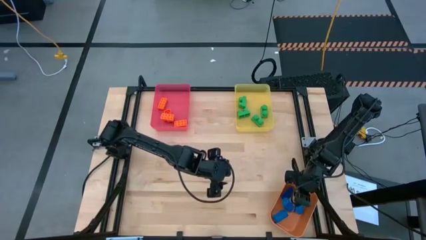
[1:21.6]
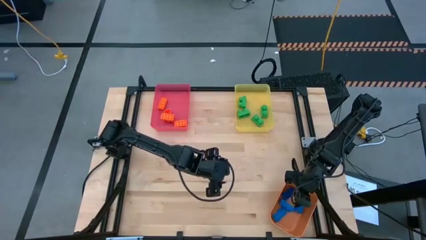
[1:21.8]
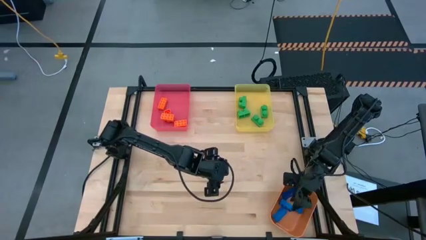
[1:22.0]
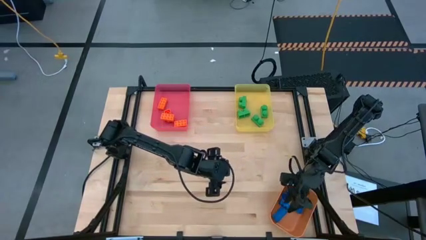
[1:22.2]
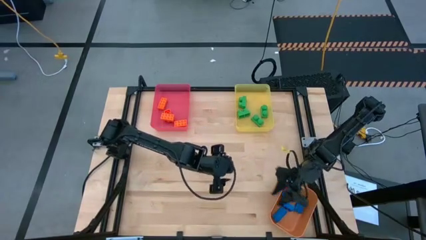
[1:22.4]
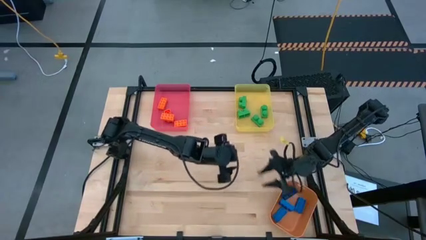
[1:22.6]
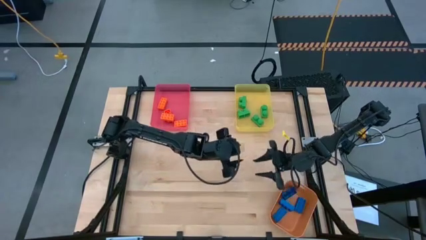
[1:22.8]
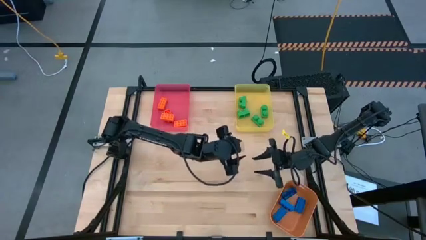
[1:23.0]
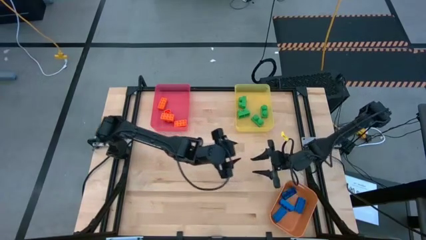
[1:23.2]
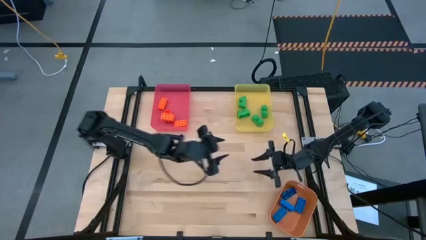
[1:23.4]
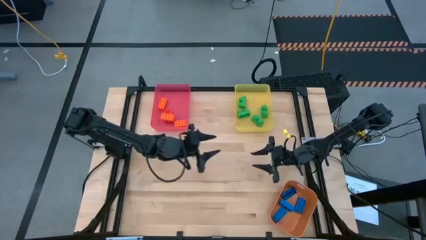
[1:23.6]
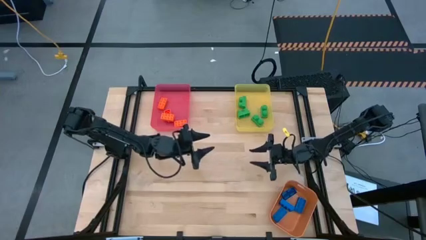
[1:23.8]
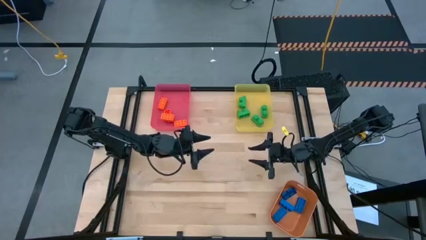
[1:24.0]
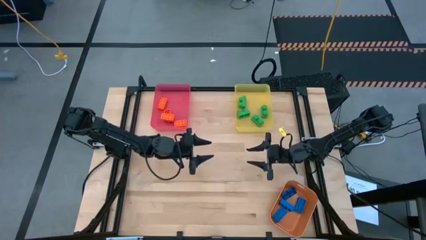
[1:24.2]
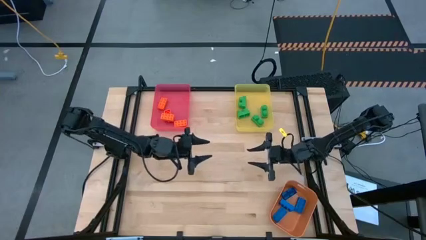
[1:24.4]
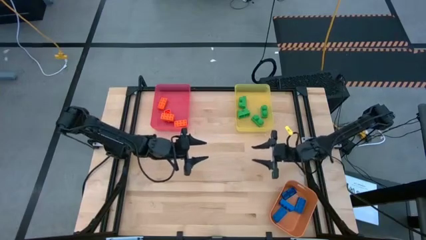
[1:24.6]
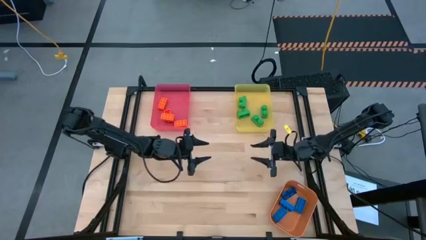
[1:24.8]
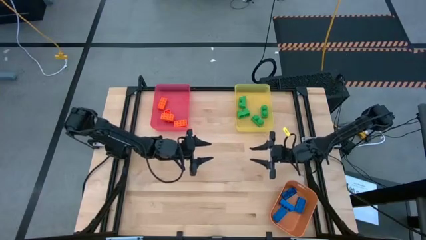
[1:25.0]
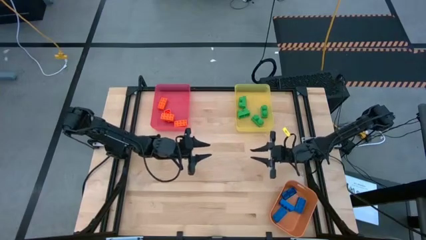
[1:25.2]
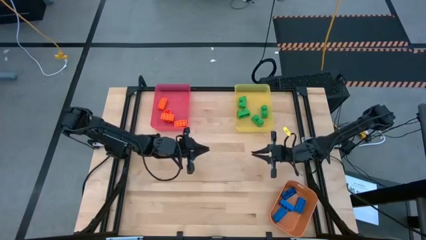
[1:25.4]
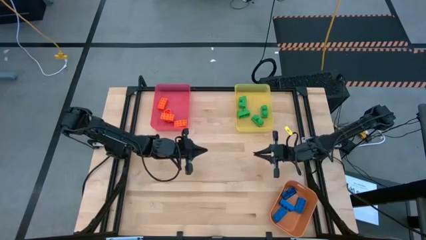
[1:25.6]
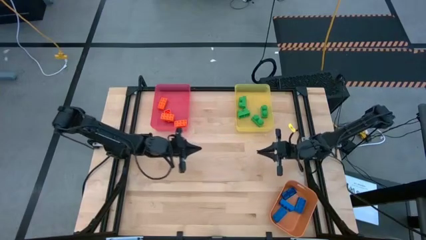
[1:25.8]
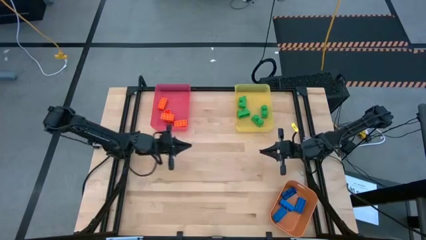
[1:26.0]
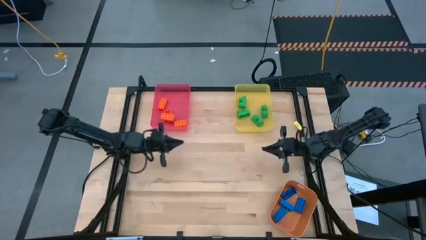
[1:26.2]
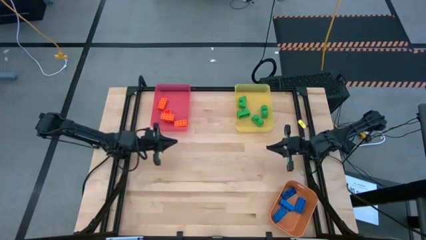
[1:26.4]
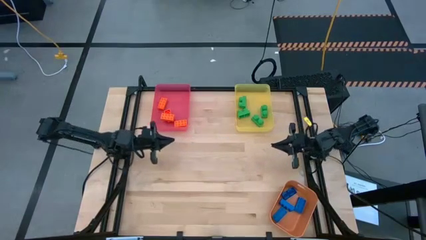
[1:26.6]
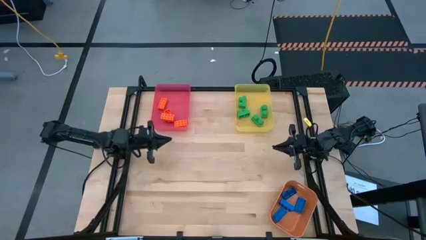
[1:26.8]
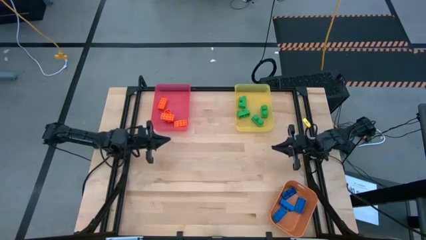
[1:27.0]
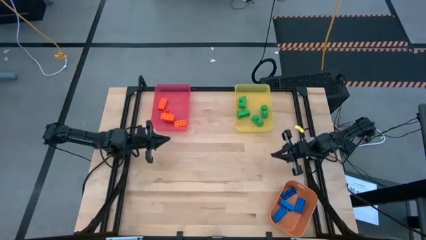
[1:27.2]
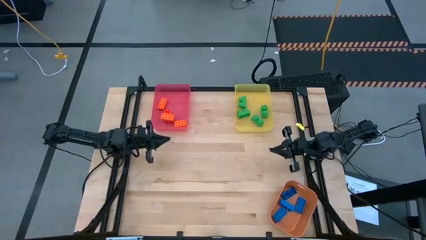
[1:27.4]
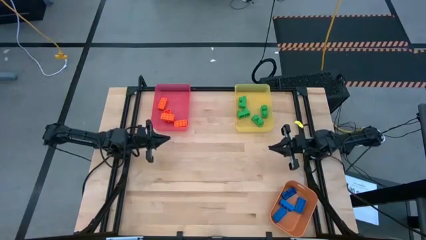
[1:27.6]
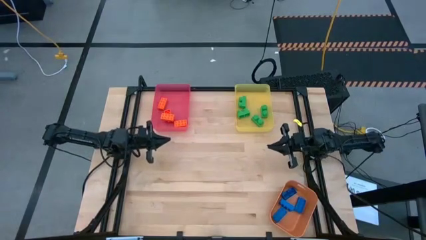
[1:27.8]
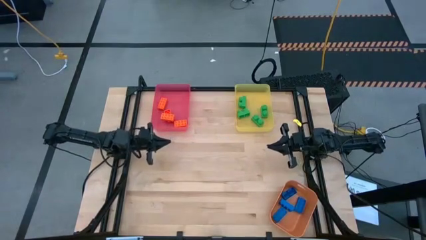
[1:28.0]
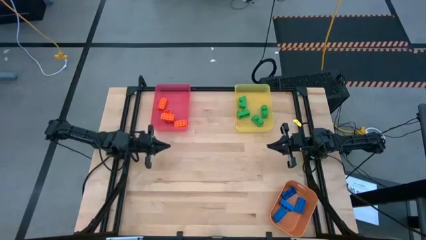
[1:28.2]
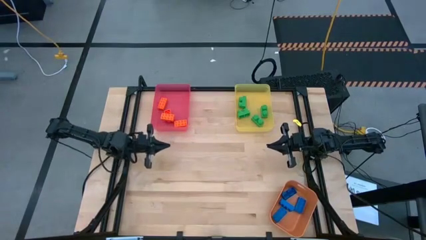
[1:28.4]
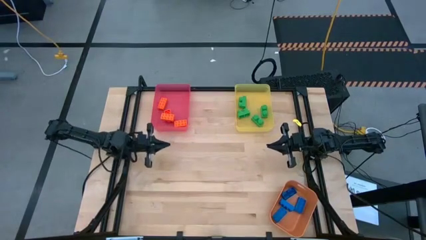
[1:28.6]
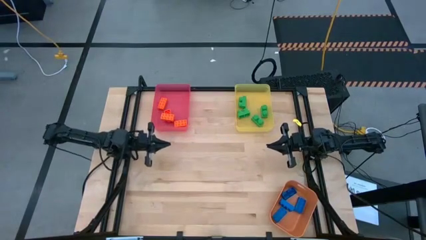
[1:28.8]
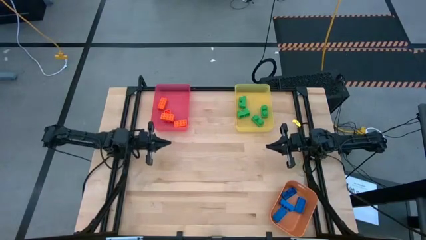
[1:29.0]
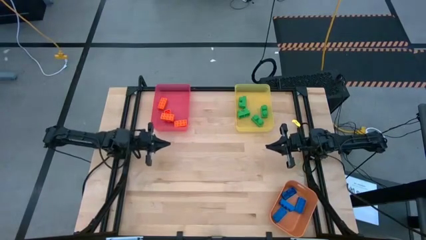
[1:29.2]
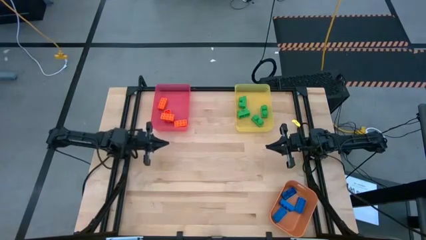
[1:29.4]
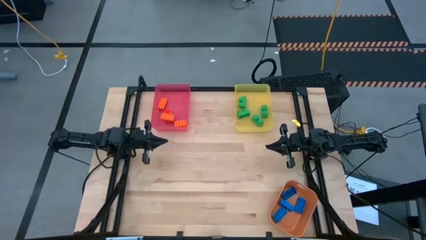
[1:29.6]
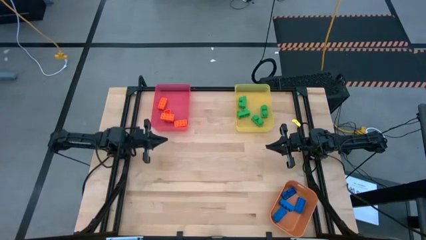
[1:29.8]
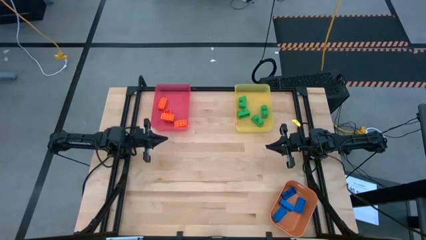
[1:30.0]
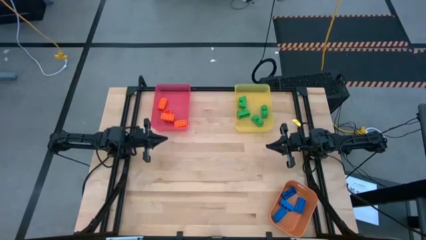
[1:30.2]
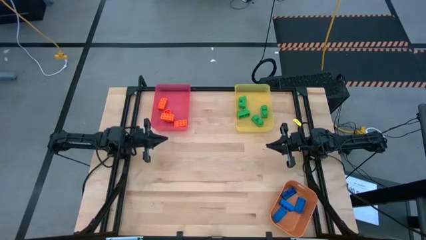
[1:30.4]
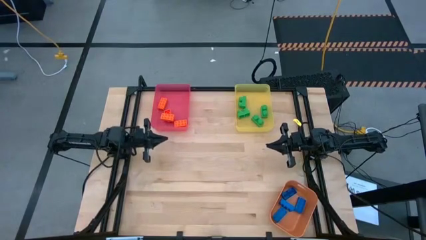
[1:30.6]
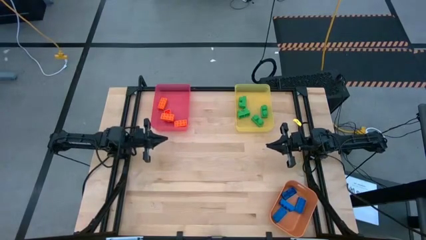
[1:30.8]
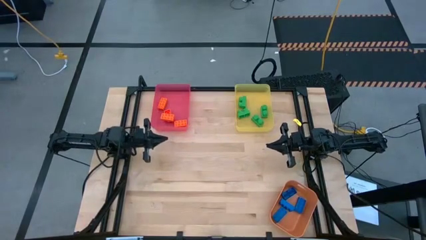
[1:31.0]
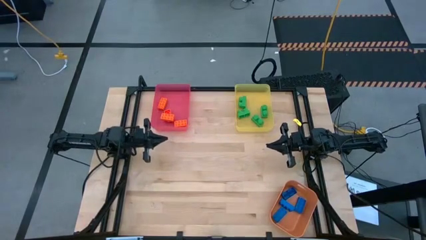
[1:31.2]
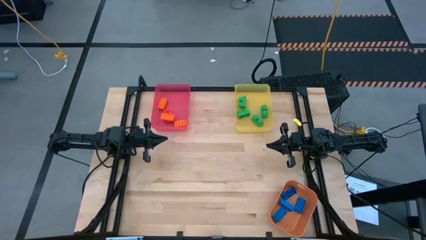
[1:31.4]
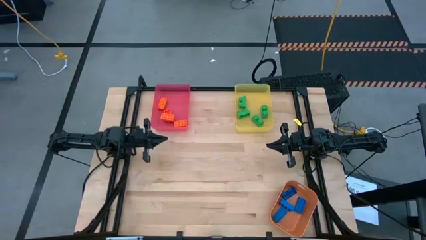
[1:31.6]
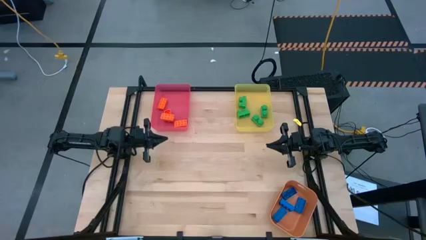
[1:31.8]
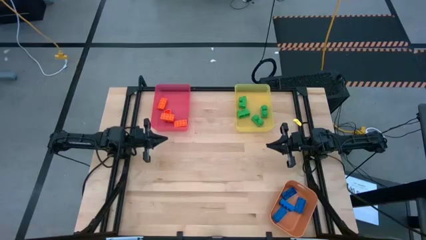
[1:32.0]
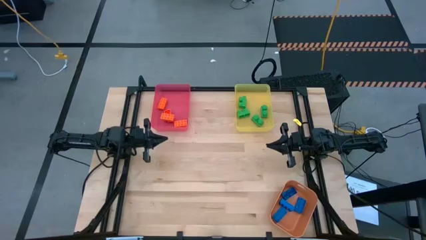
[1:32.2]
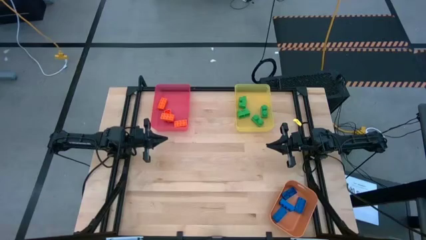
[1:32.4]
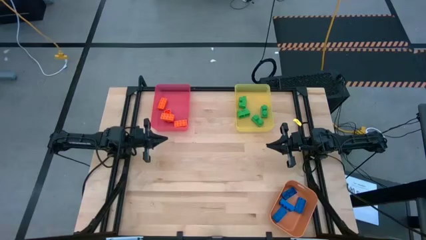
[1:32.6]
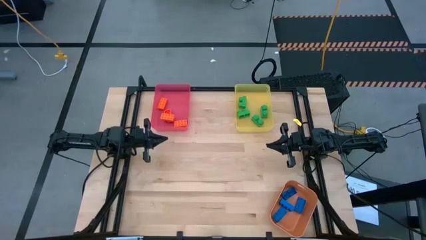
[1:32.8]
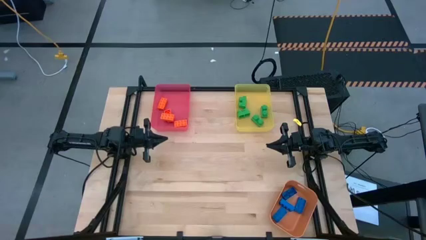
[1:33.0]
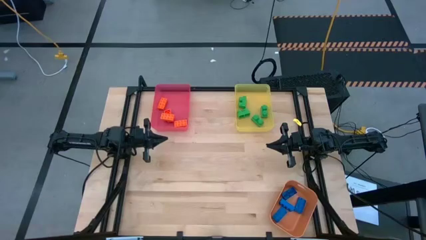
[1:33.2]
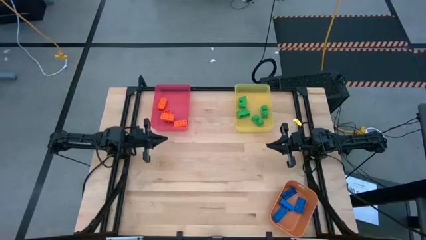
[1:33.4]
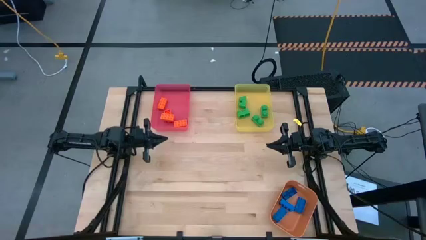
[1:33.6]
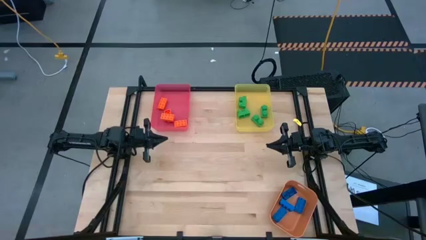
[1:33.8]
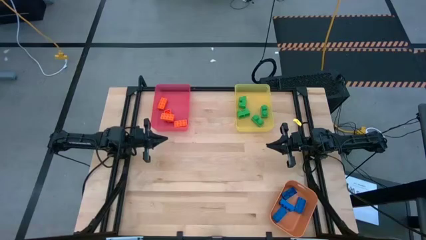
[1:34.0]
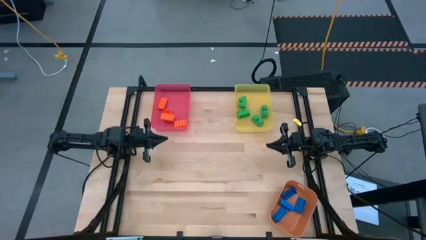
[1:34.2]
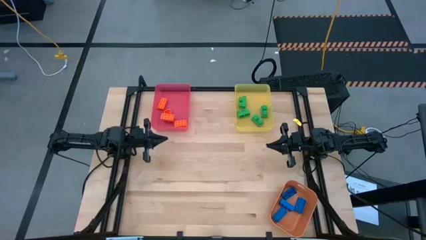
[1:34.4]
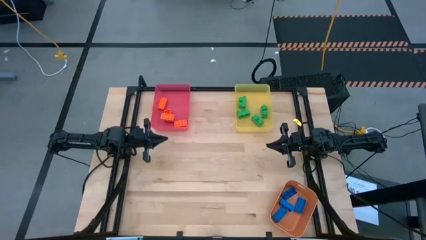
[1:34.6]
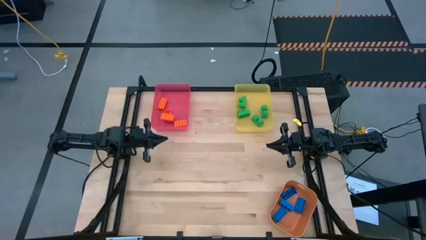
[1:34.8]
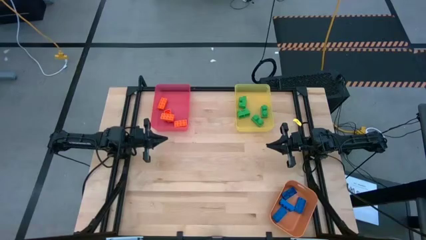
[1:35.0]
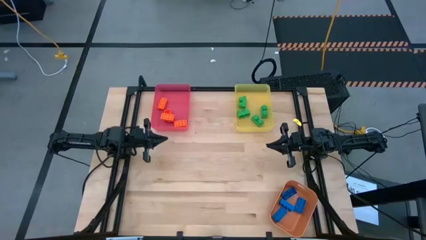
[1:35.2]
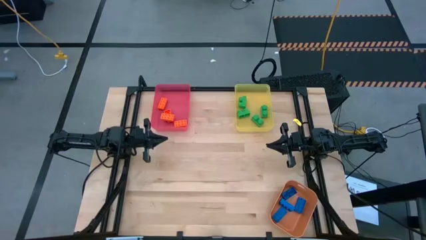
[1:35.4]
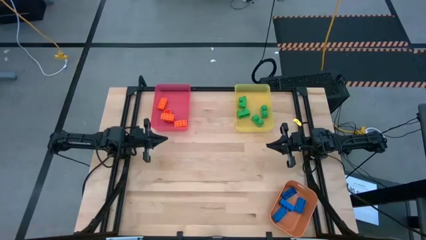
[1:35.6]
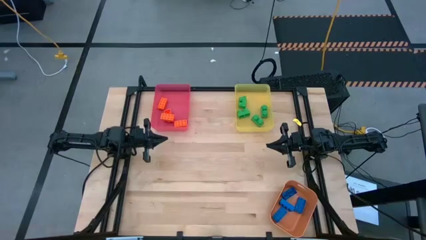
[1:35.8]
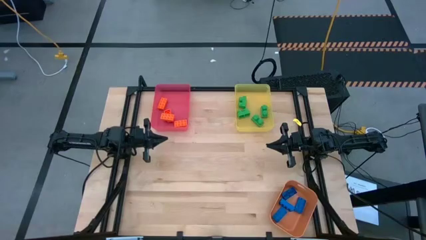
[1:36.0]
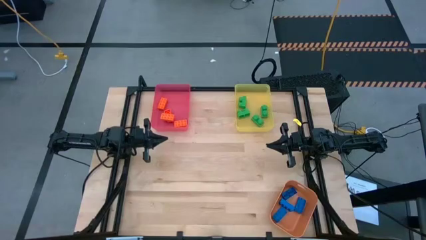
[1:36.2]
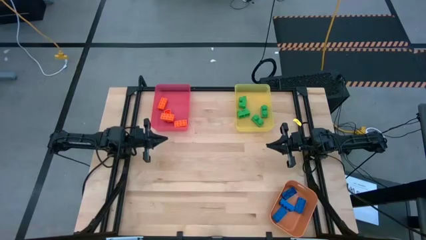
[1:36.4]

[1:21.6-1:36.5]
Task: Sort & place blocks by color
Return to Home Position
